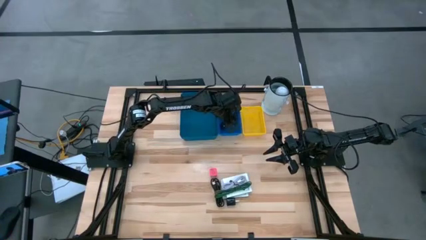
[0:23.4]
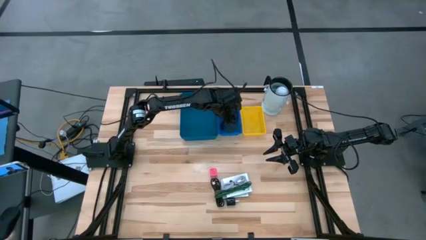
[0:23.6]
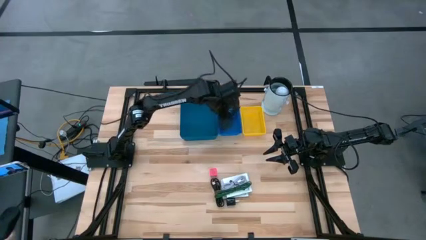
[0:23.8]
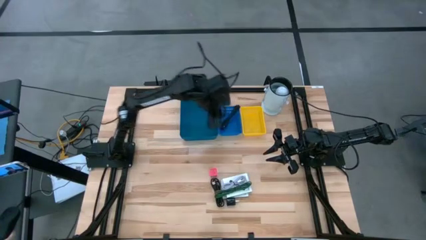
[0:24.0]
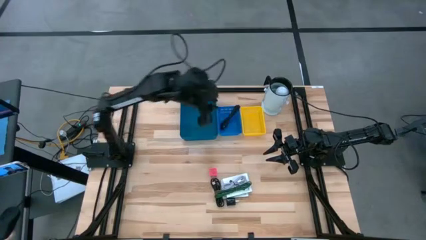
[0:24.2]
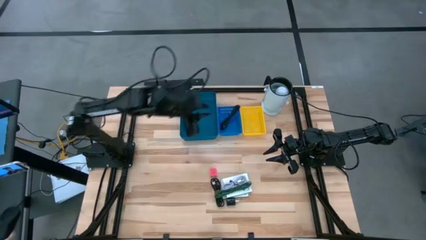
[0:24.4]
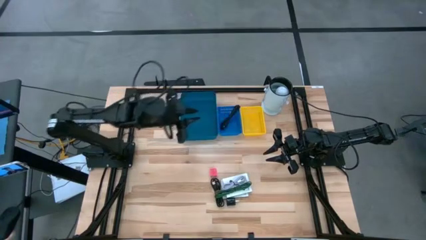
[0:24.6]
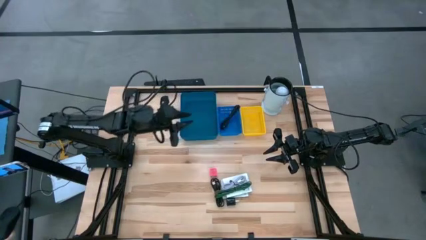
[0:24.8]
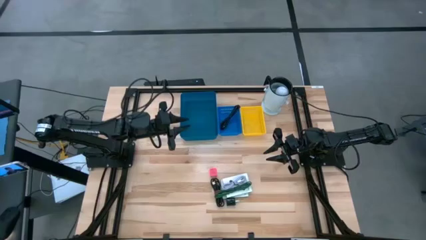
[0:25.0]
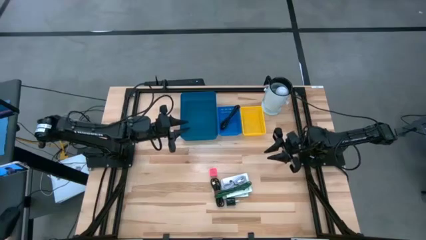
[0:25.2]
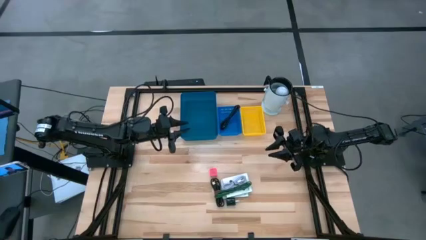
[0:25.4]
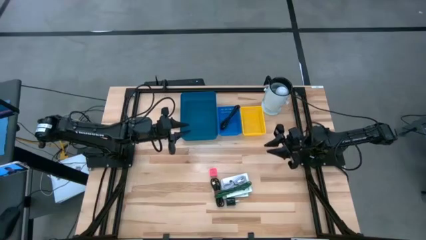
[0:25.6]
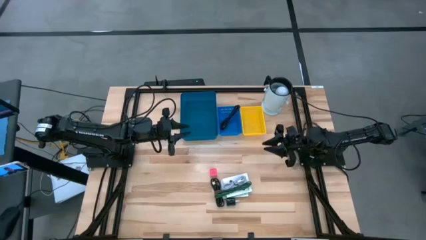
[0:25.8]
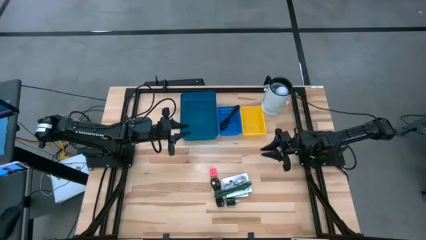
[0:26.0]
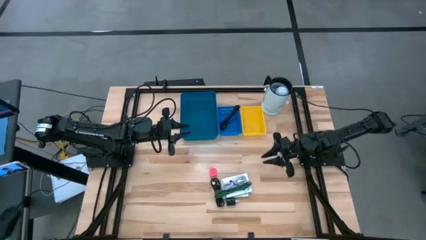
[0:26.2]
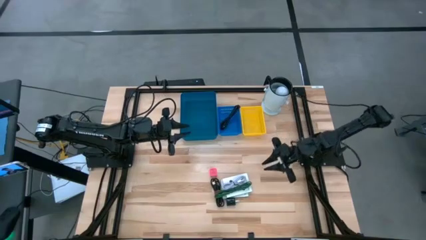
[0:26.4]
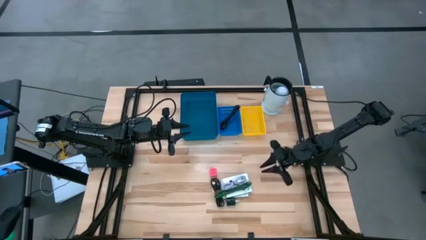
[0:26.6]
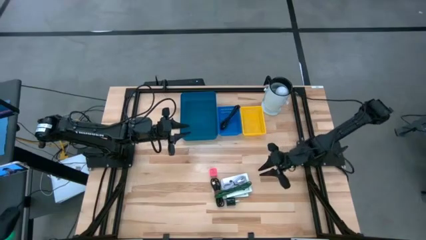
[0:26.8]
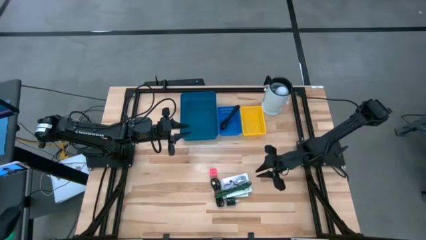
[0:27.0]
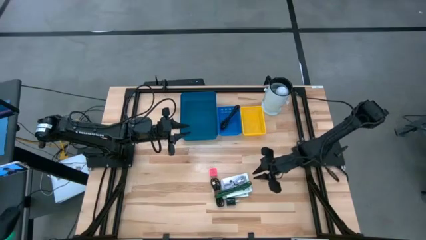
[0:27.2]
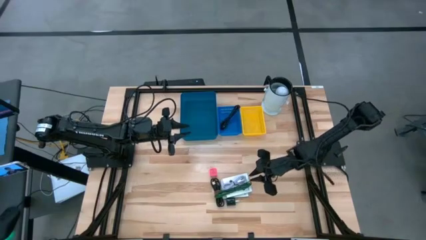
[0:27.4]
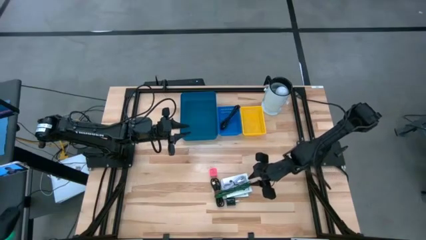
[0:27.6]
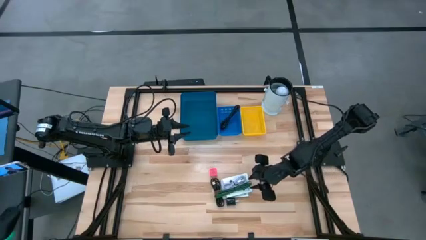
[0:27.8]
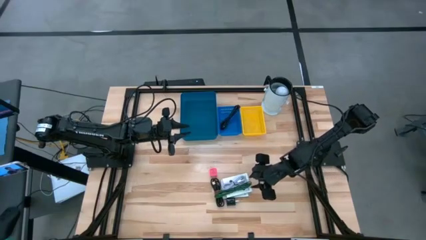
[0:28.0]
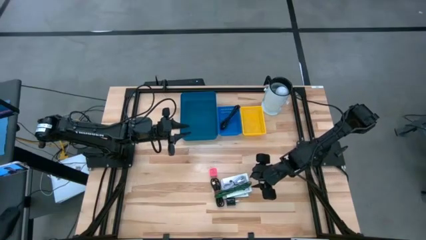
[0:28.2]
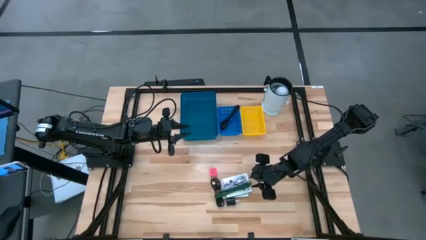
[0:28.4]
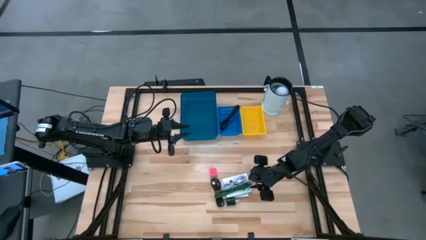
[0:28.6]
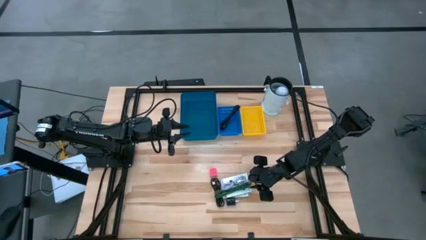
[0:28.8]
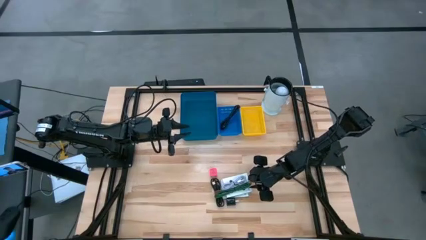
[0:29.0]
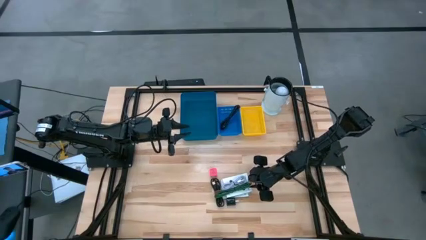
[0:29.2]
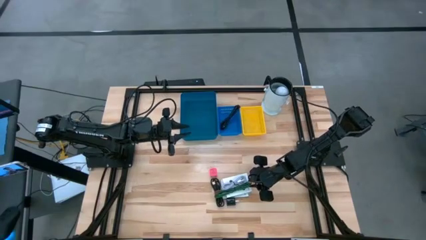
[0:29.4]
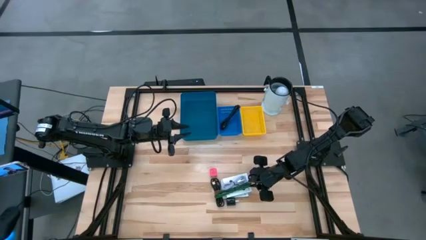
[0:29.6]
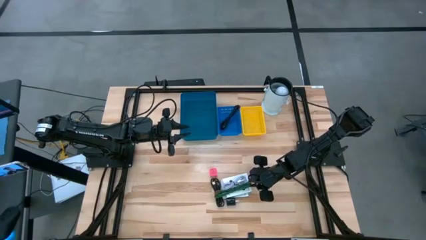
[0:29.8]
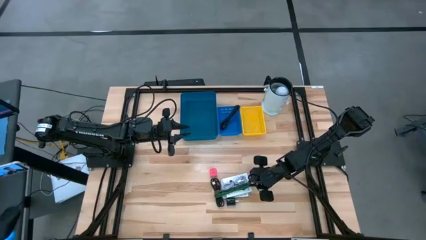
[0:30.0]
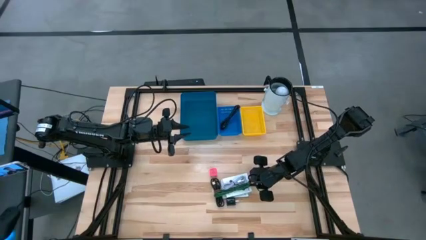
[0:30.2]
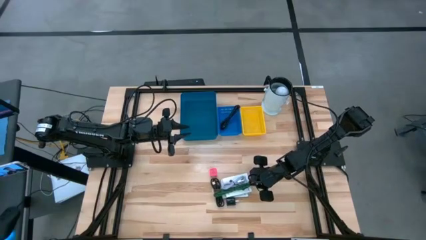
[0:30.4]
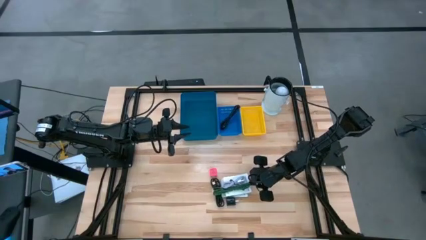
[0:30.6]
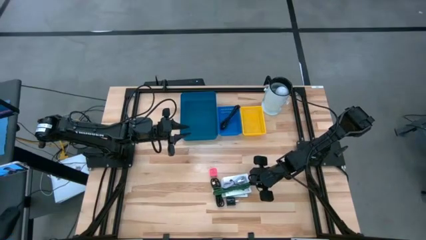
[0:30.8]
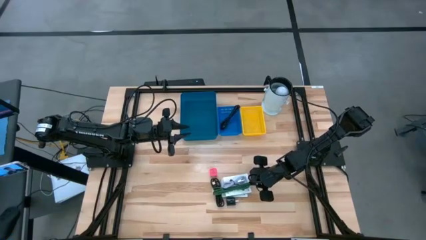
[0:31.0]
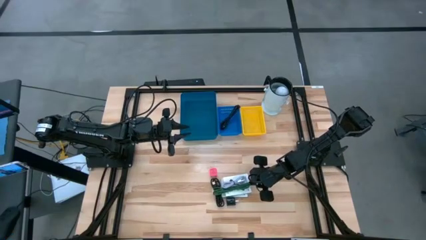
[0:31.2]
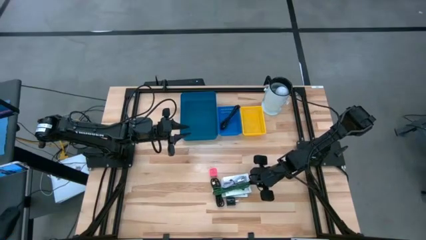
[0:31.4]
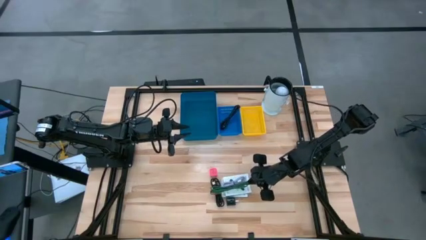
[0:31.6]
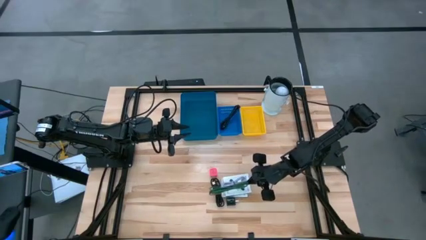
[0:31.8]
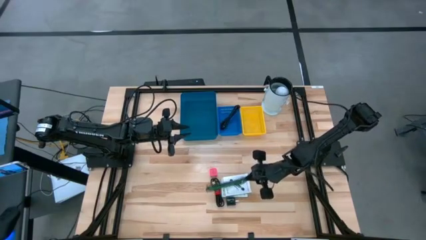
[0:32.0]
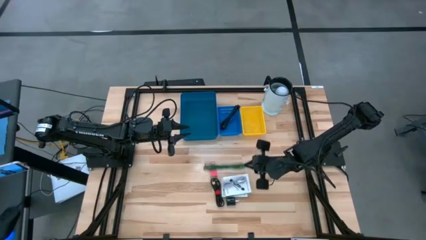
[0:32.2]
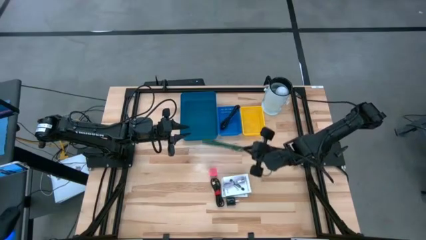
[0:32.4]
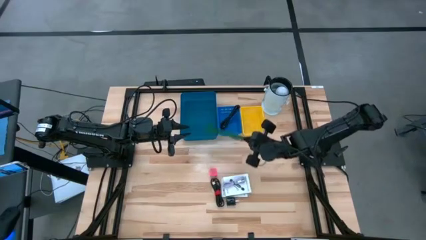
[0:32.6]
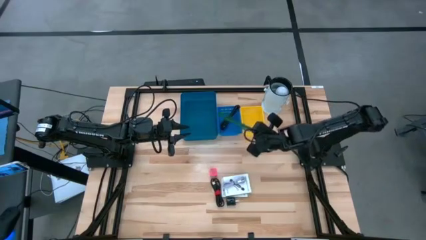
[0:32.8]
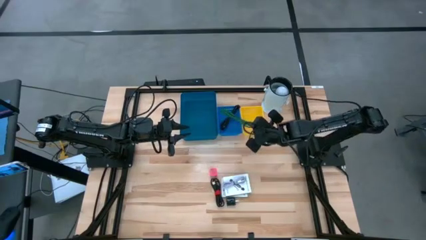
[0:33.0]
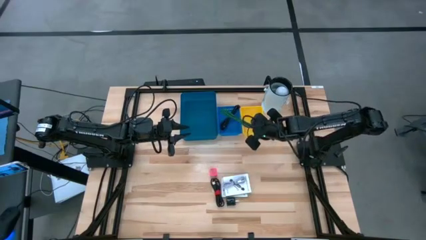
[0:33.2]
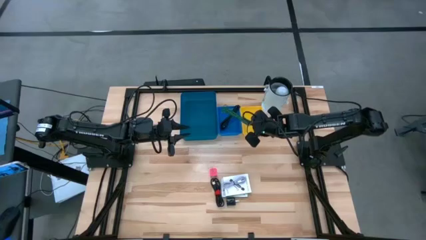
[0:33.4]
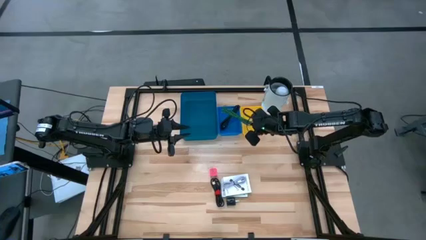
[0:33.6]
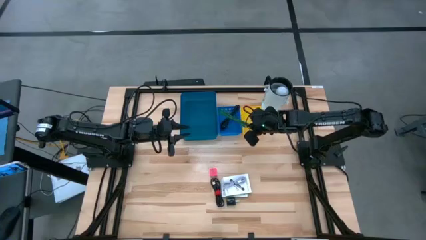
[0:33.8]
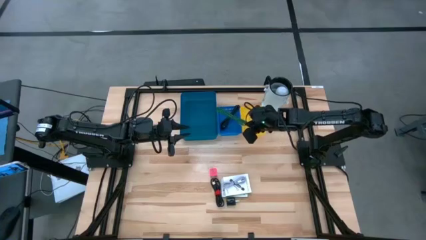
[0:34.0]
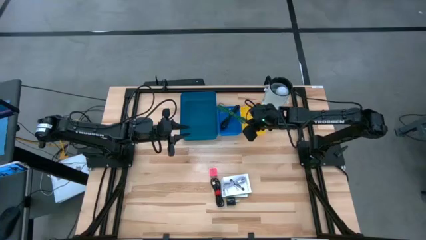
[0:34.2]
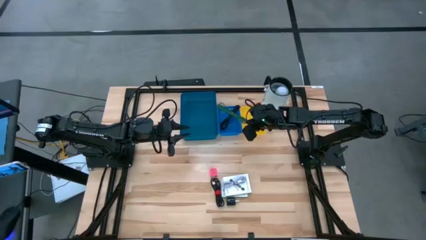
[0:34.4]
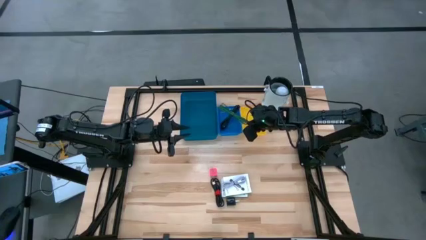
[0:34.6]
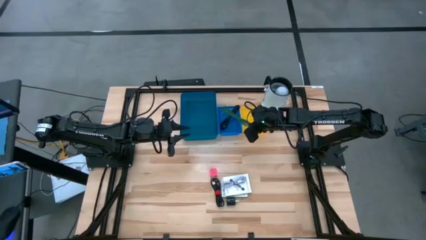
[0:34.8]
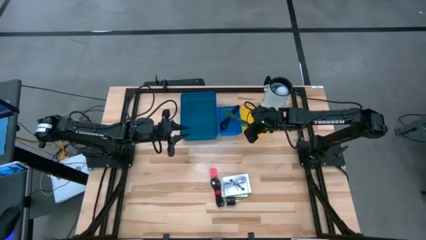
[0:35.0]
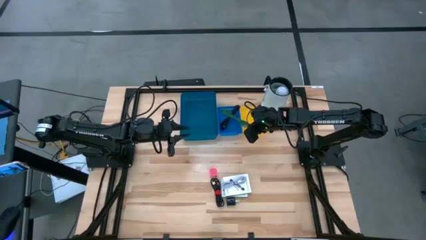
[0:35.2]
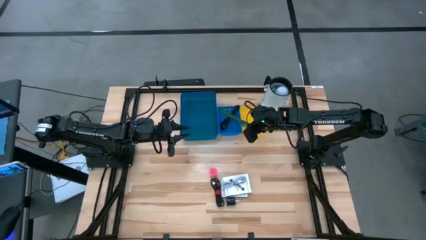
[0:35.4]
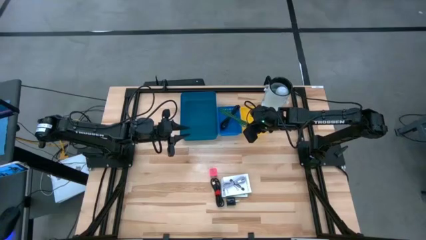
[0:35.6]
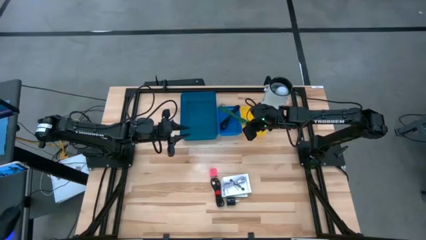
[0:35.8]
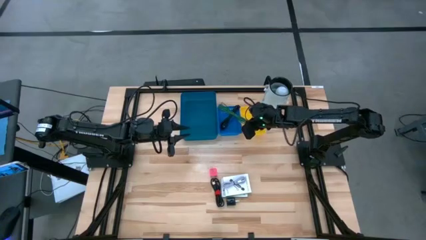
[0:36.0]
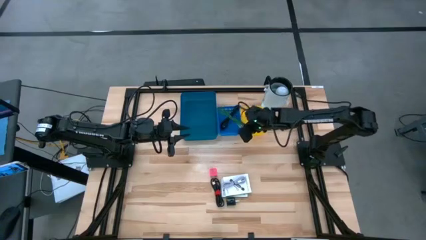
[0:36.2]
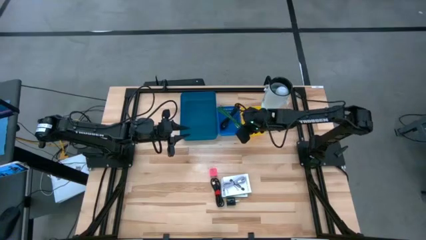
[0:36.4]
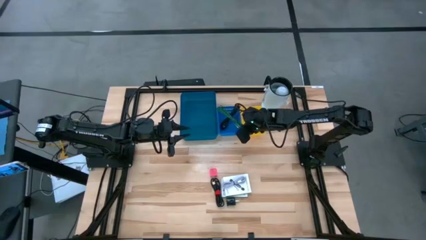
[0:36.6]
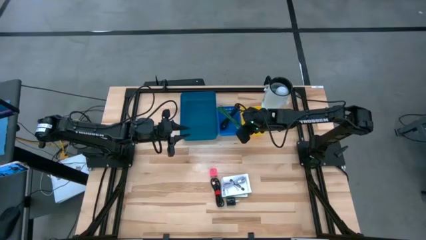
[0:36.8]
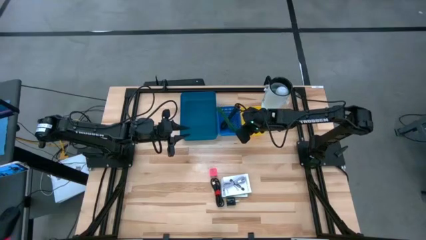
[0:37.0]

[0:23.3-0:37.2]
Task: Pick and place items into bin
Put the green charger cable into the blue basket

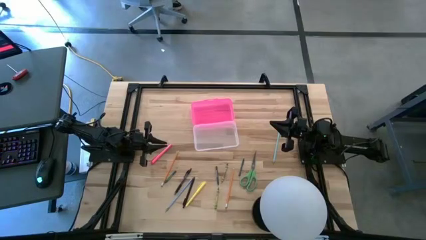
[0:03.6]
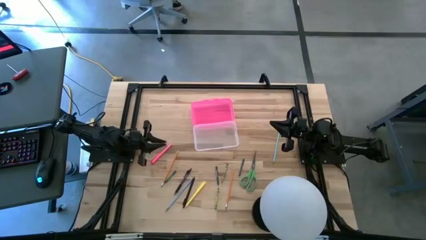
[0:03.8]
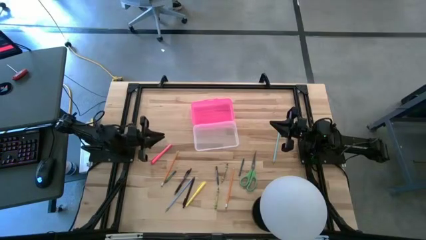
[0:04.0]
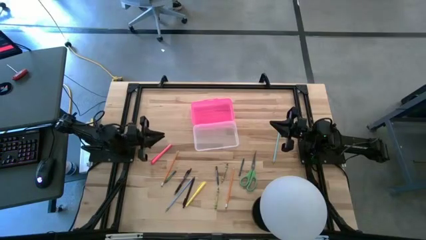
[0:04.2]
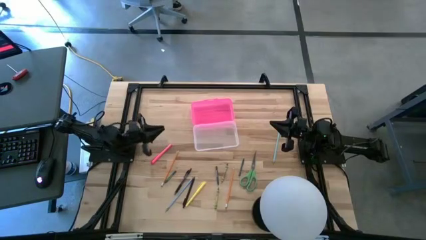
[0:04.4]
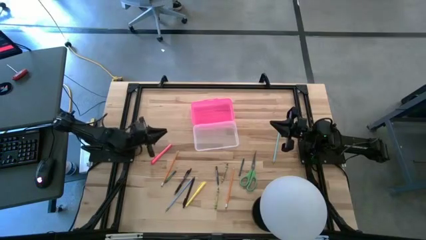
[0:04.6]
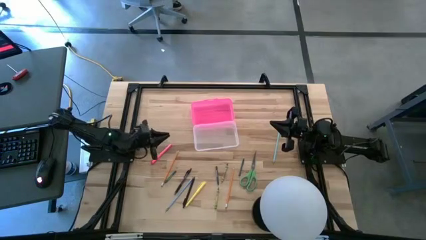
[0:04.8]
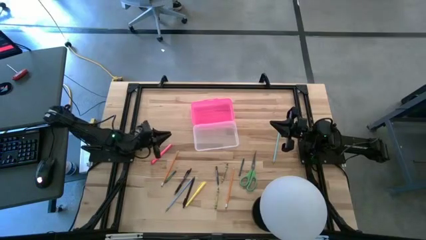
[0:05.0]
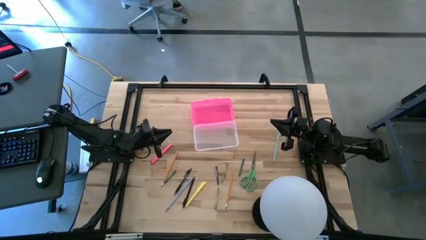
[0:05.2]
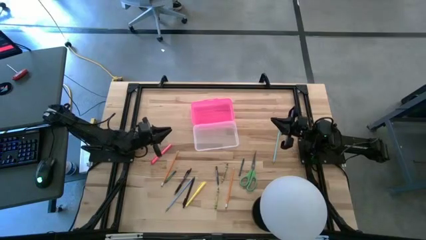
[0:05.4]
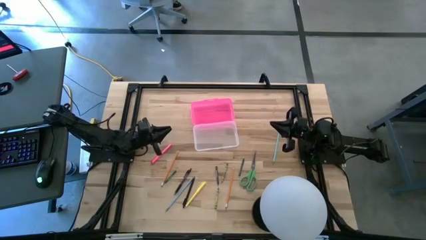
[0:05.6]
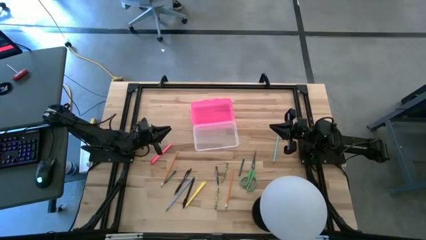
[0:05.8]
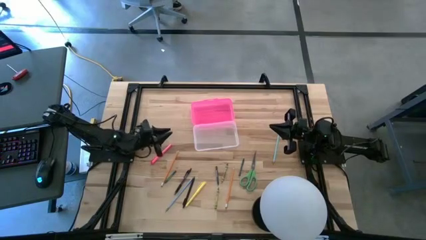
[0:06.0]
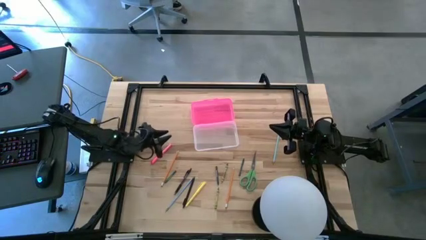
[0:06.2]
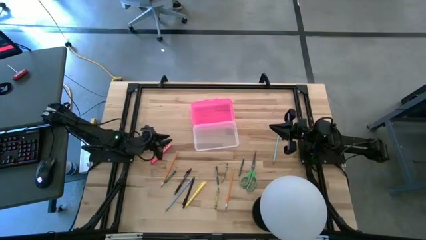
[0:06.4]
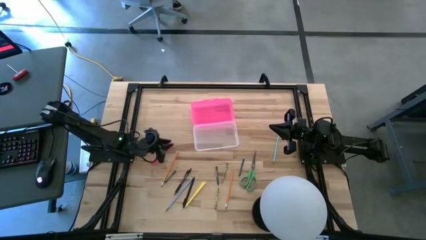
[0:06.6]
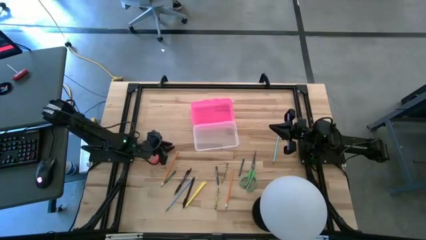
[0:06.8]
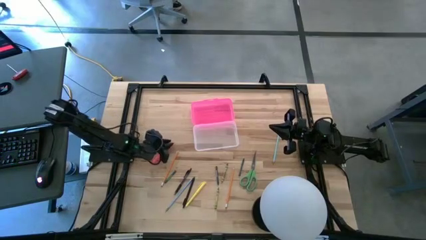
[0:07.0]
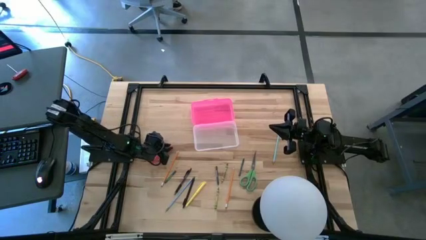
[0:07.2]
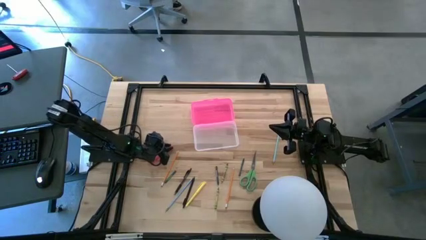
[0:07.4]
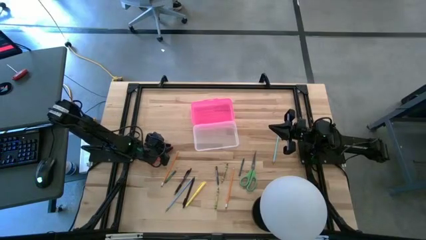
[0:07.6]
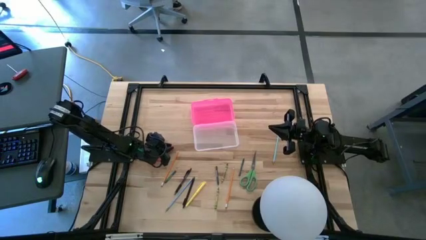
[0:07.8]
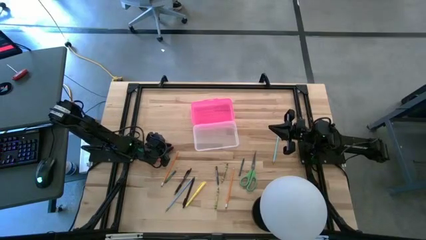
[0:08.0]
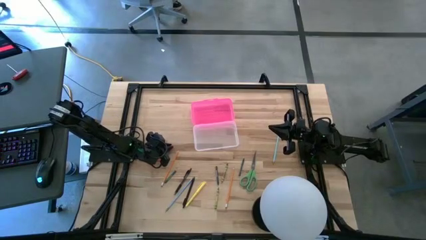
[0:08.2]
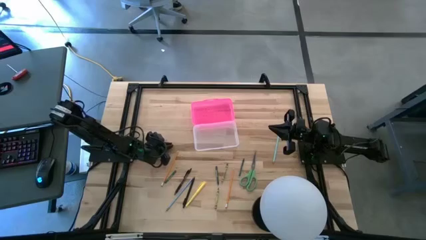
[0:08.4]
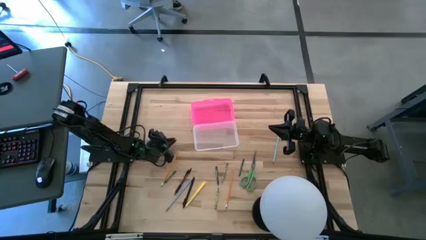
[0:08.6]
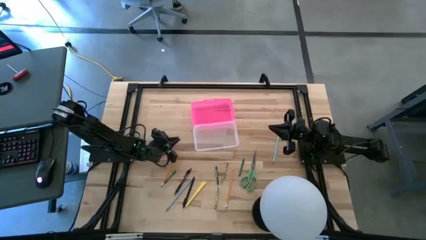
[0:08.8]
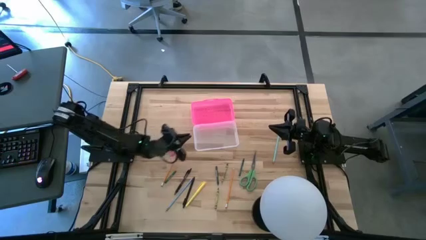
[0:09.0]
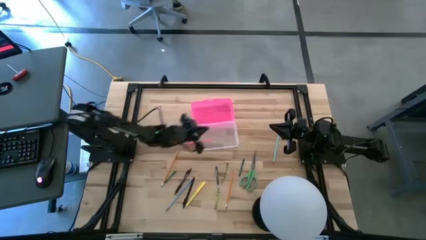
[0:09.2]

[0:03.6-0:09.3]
Task: Pick & place school supplies into a supply box
Put the pink pen into the pink supply box
